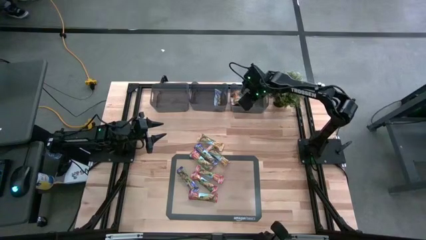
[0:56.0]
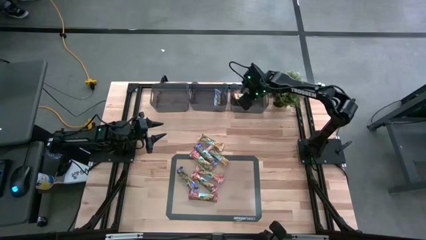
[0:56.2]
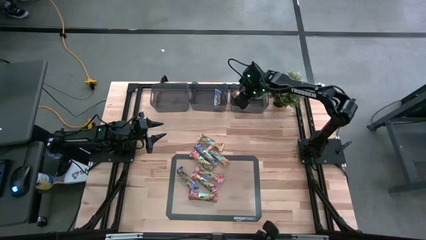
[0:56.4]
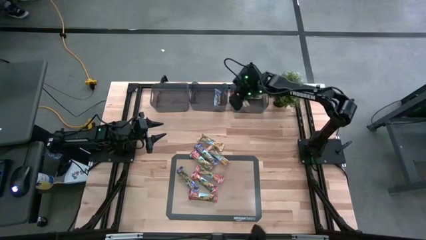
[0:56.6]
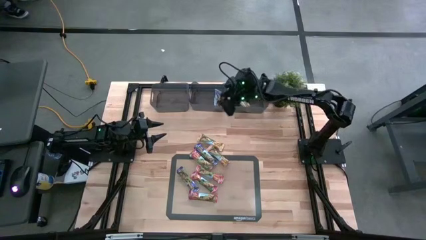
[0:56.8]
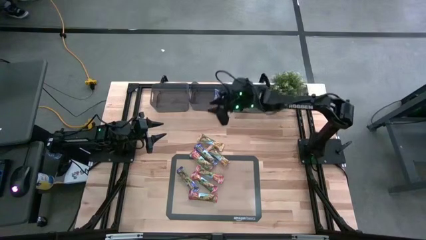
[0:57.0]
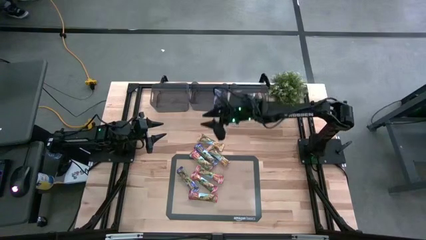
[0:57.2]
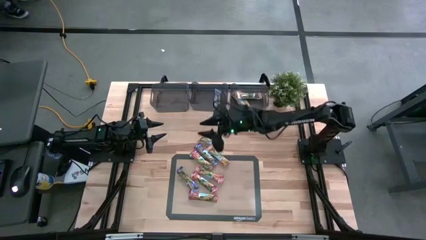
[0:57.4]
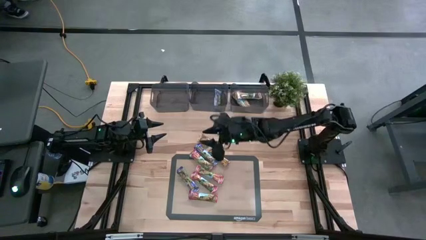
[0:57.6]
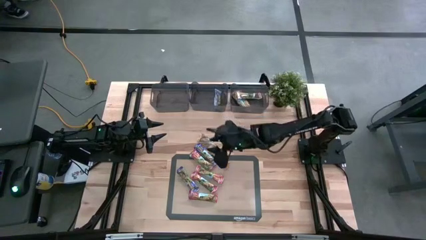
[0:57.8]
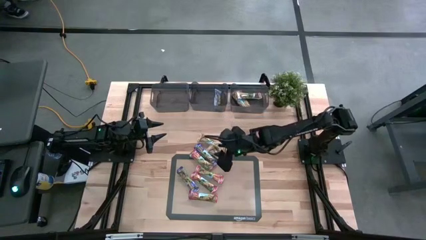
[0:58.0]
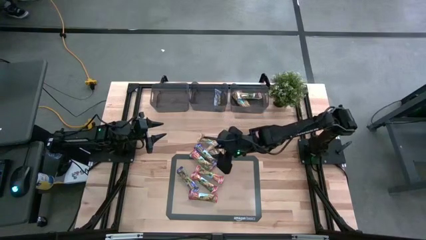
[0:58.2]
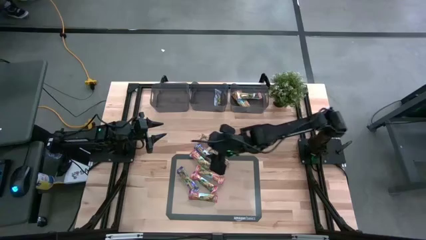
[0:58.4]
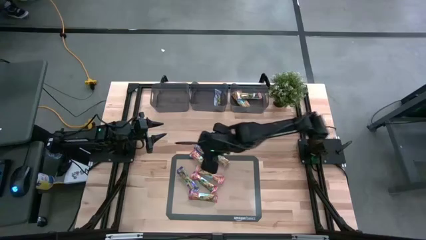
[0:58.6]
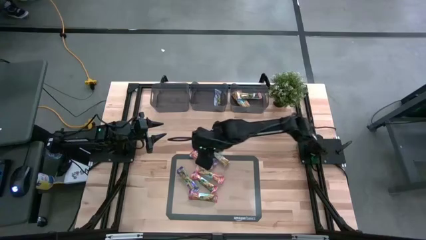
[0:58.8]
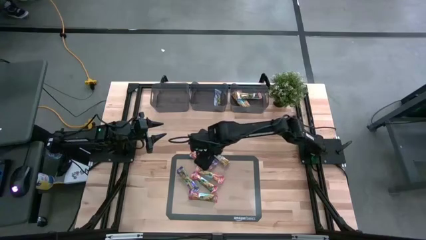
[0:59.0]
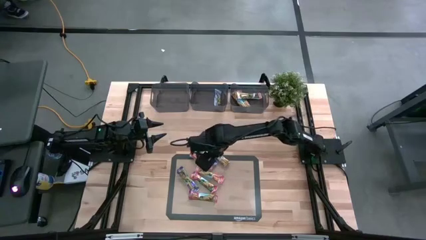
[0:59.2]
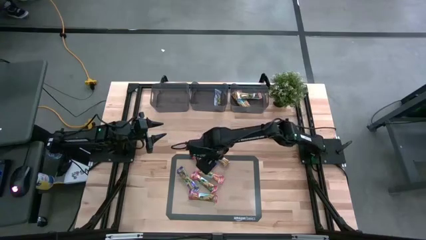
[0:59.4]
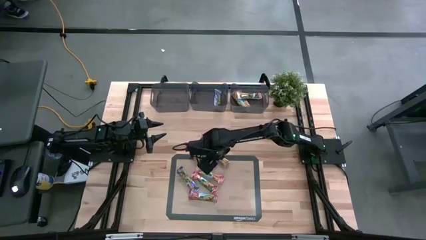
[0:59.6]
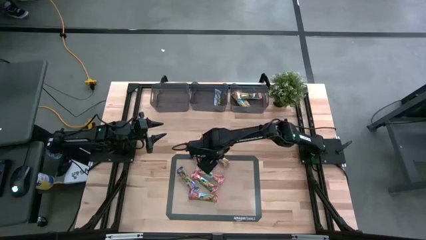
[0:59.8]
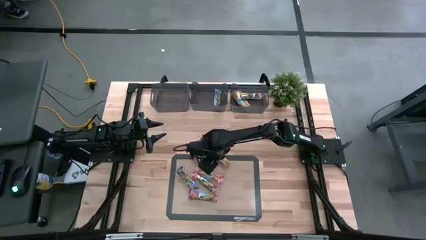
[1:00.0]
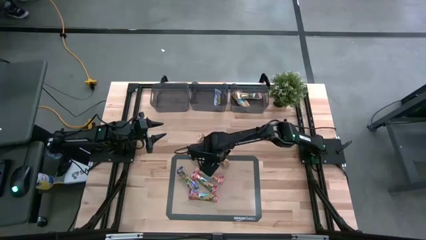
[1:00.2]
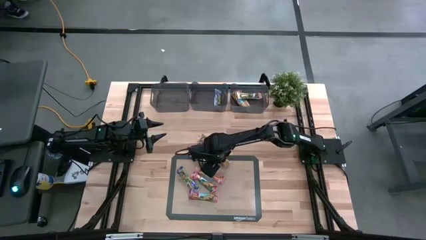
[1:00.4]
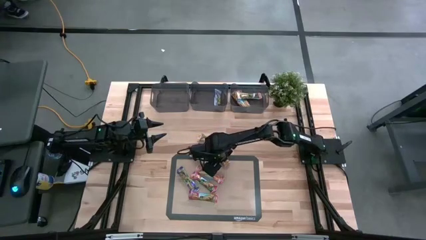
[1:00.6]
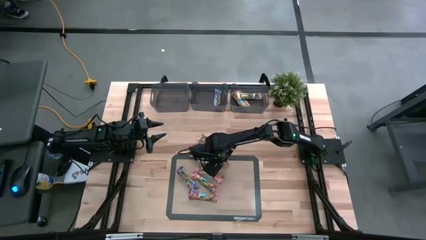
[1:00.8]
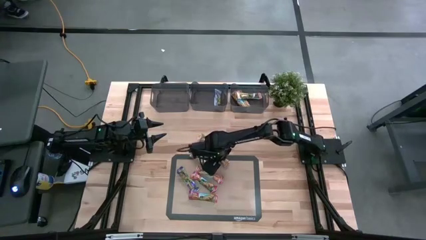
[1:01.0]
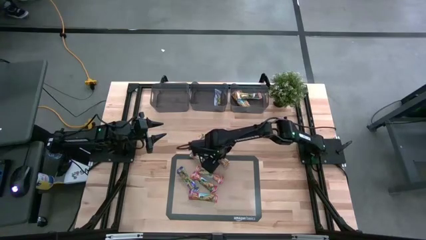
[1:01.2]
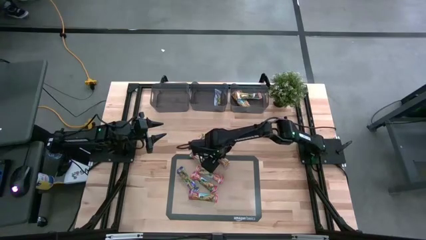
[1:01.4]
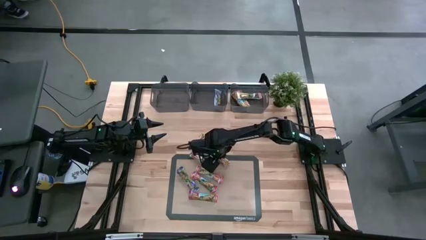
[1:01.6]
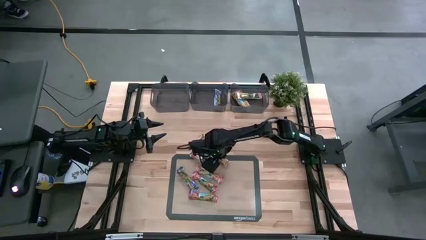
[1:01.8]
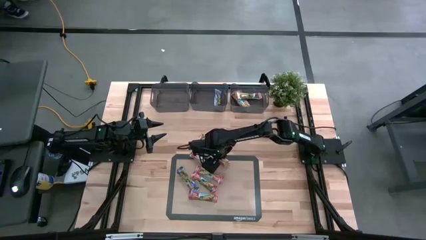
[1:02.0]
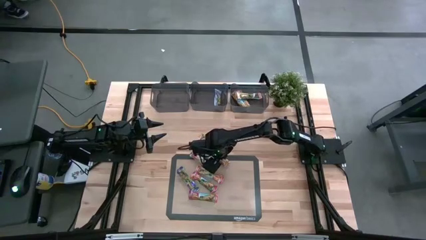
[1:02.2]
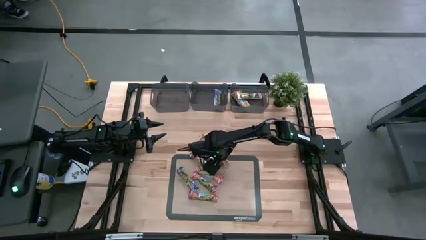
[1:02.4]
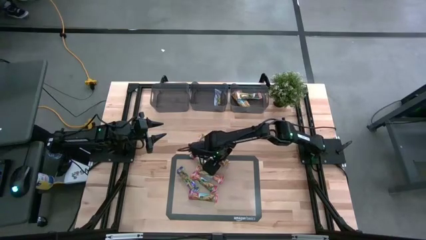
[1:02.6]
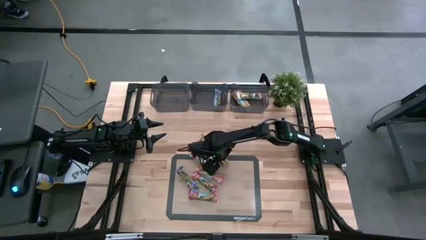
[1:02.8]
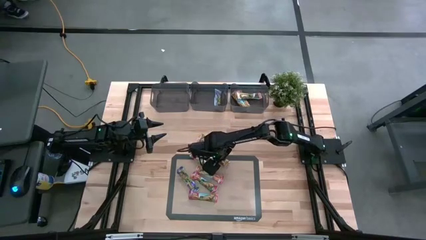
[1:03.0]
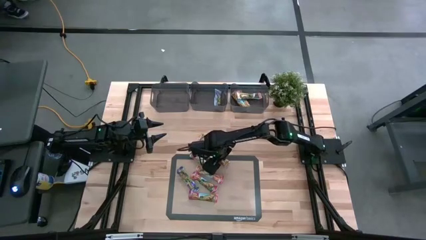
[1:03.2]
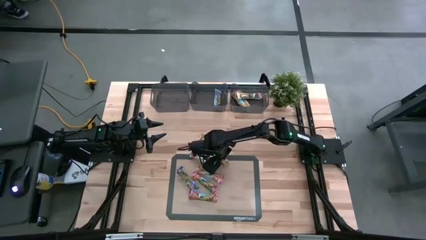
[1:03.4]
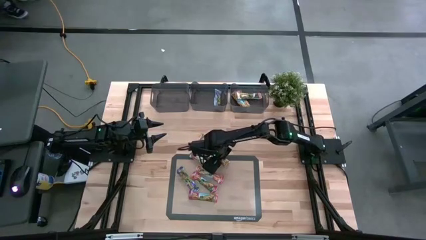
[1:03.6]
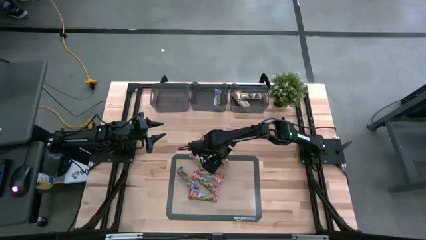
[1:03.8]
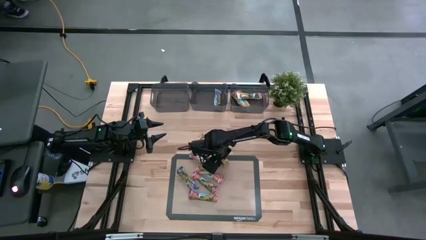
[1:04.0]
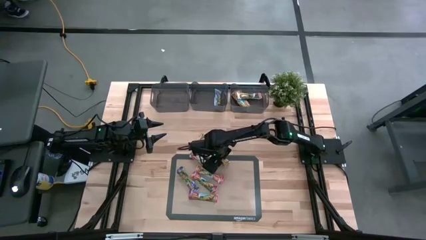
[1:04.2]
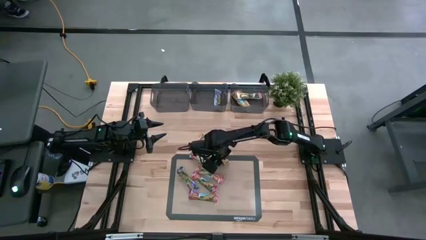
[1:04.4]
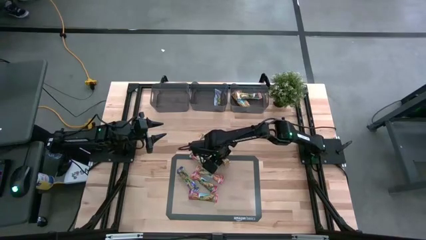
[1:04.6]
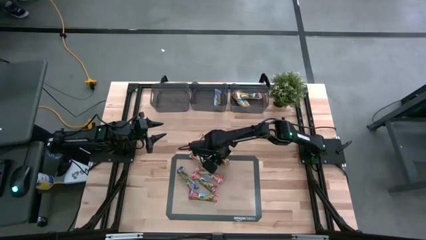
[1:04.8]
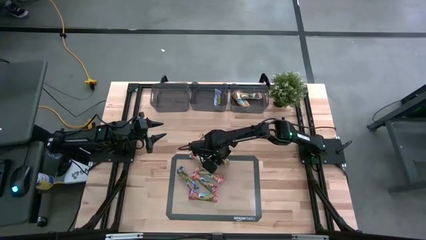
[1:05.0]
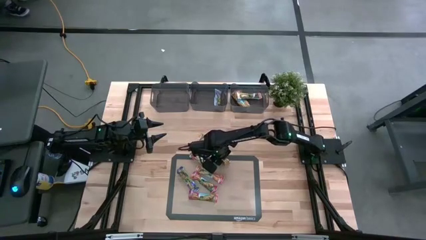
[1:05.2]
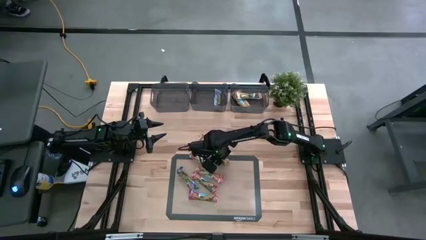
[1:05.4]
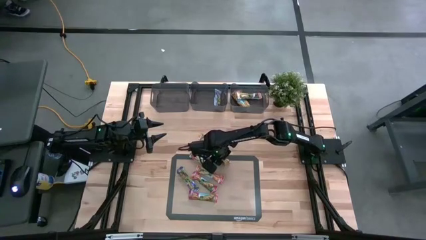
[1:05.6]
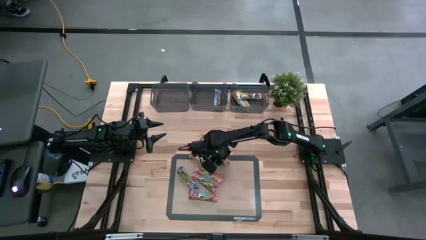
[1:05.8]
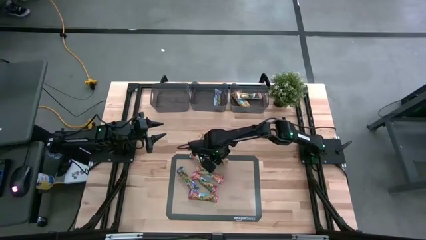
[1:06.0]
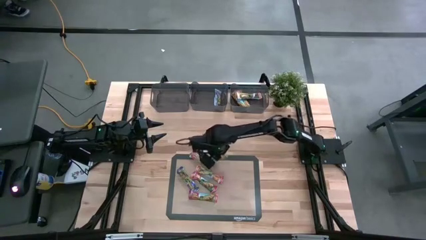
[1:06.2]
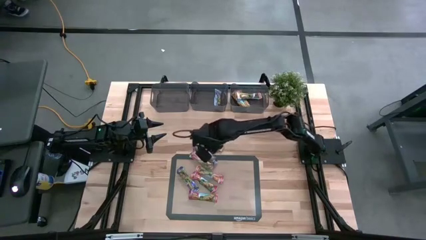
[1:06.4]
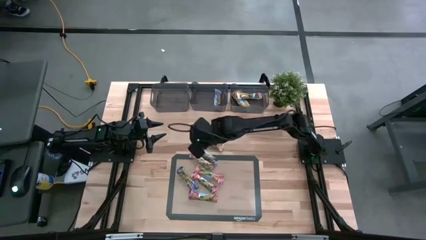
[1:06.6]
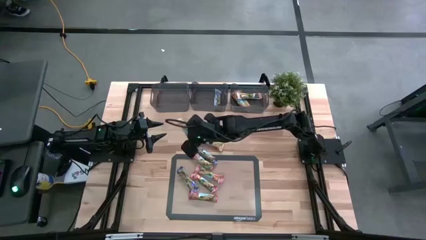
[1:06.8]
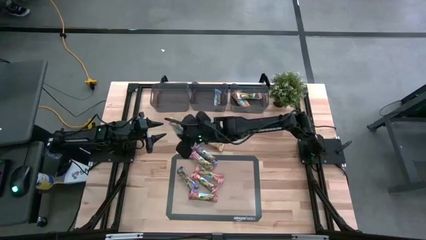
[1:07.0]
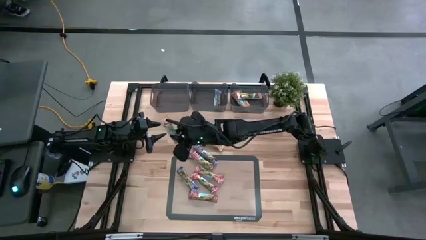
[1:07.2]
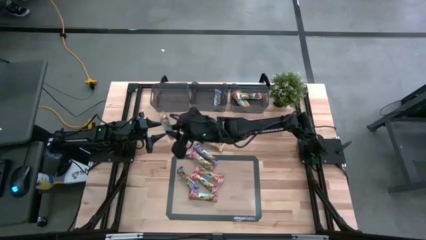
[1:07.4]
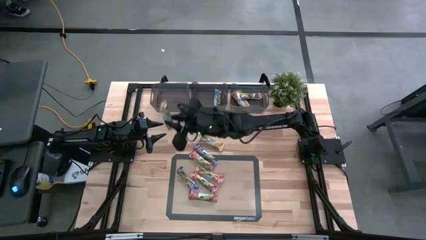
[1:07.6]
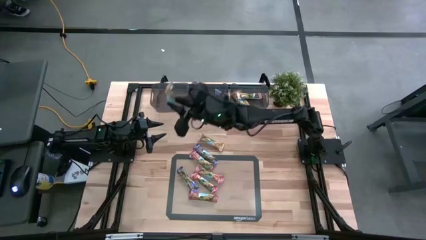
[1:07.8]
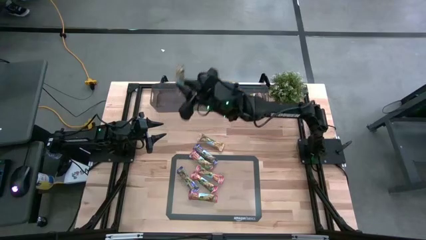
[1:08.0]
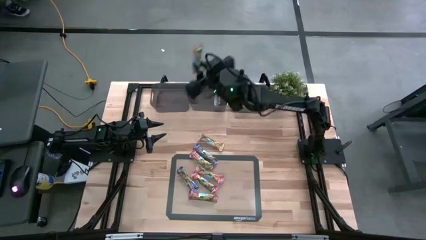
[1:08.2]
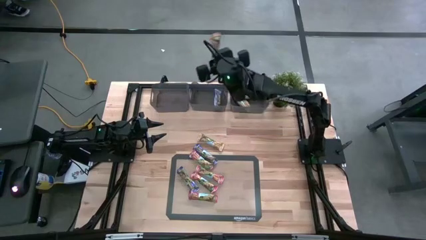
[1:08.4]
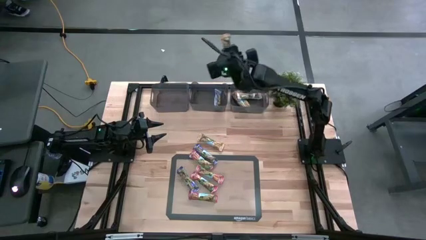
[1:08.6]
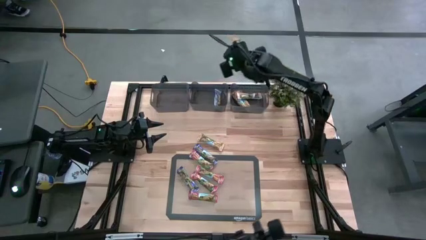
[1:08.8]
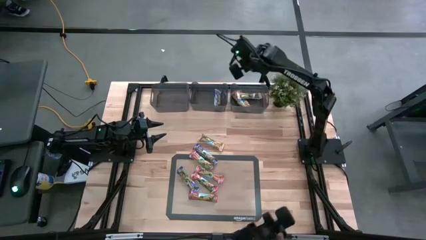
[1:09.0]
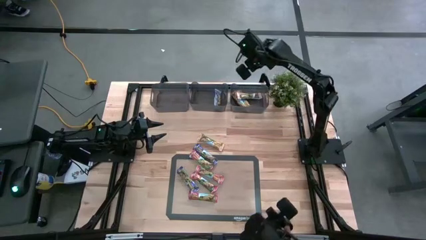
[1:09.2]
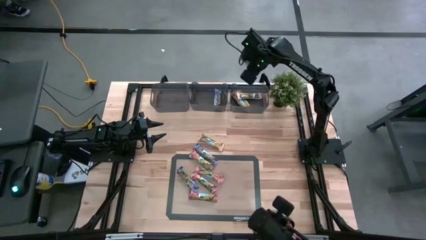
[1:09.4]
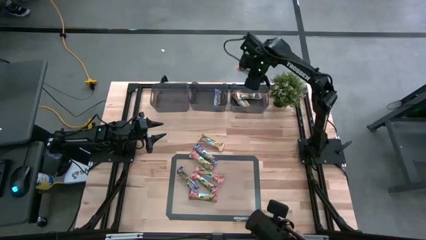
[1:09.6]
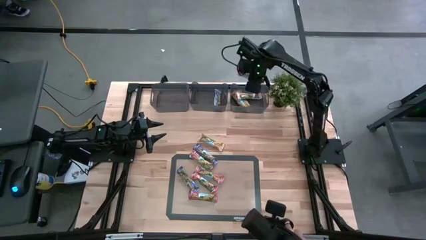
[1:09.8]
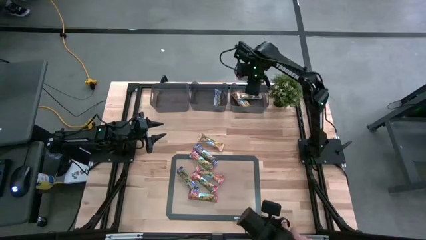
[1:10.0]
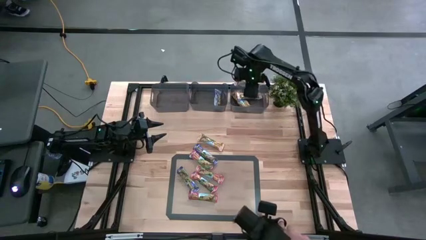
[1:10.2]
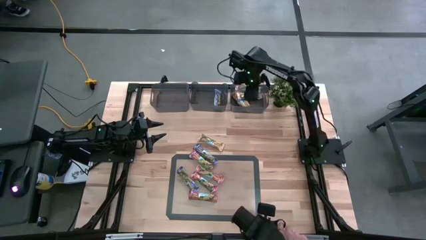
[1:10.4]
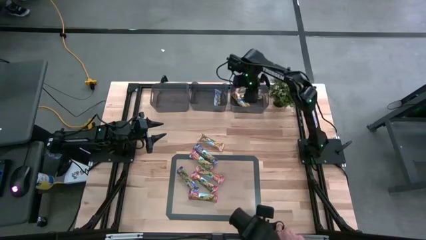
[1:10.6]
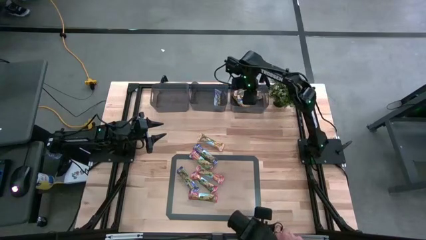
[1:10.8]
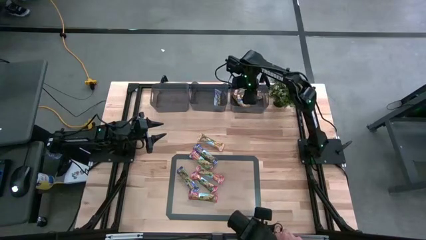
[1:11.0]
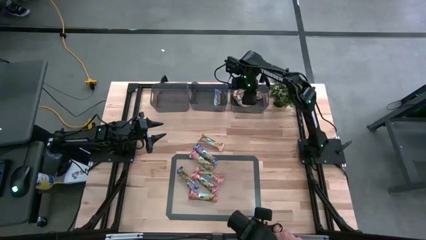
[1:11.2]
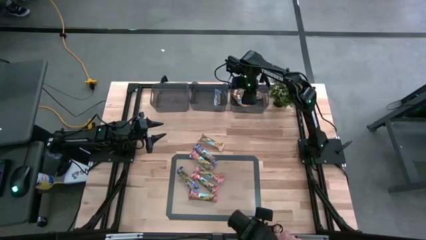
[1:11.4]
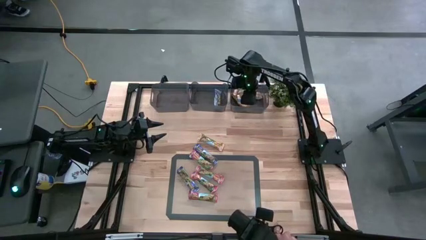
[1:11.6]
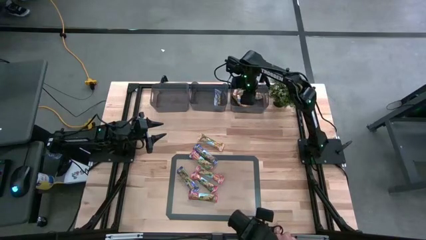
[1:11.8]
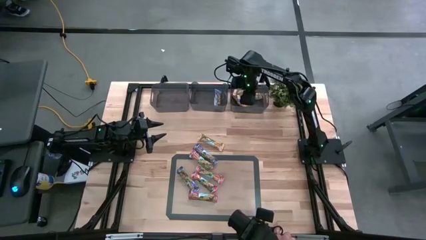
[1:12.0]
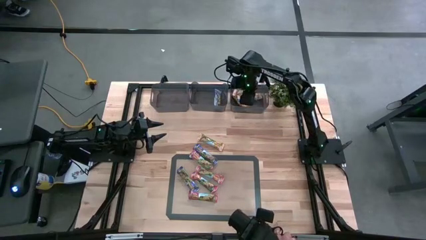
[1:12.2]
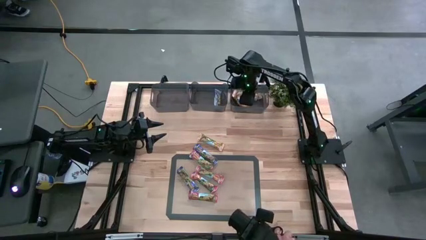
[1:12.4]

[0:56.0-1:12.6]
Task: Pick and place Granola Bars by type
Put the yellow granola bar into the right black bin

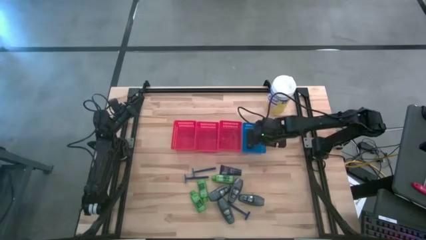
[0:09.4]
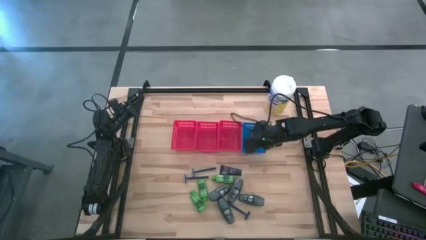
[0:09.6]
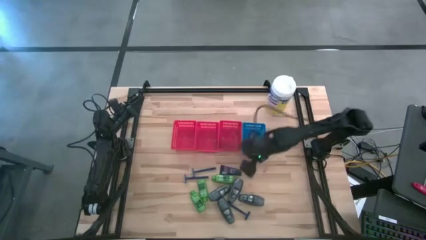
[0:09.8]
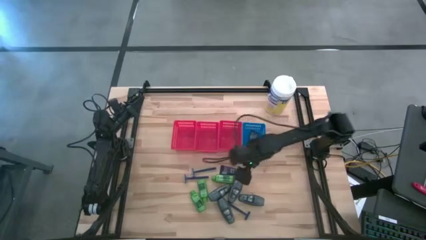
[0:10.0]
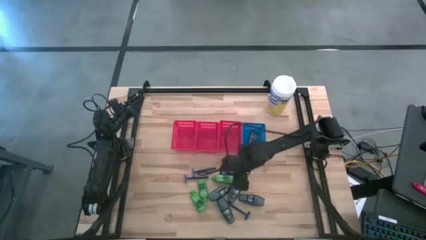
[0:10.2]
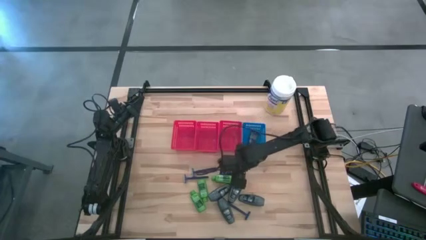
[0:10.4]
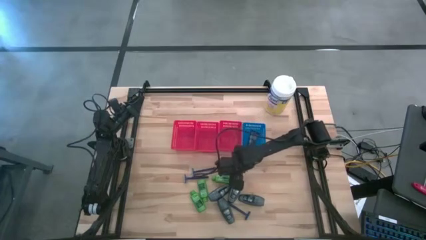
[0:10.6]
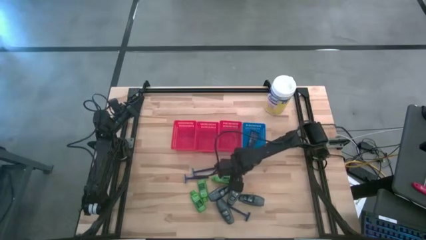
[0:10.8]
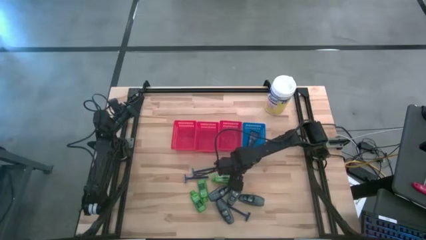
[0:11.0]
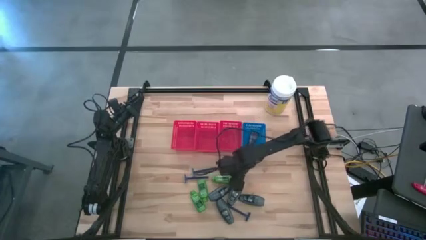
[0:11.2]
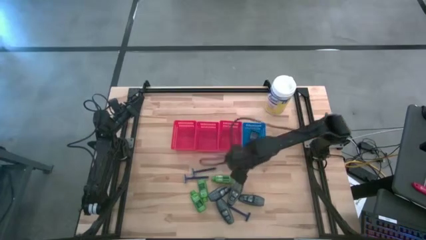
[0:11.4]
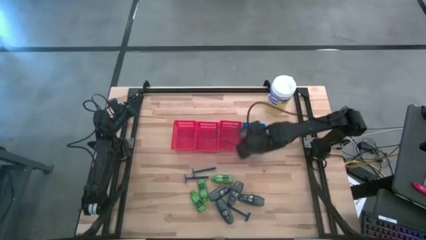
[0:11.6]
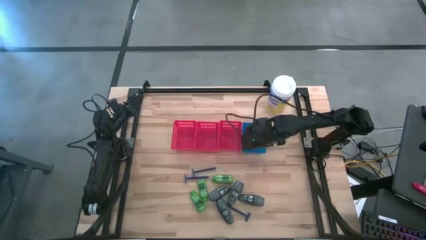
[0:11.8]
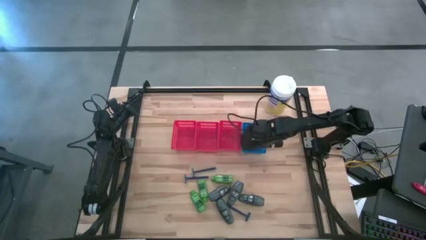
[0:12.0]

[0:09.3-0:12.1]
Task: Pick & Place Travel size toiletries
Put the dark blue shave cream into the blue bin
